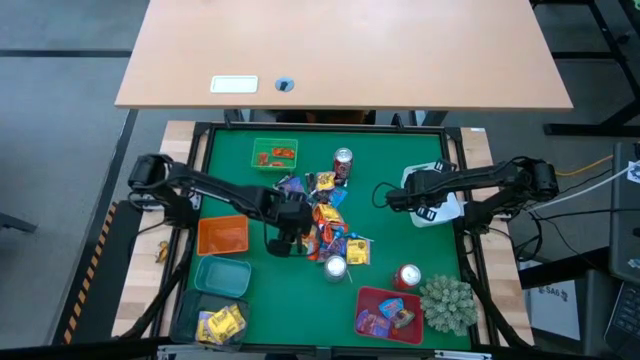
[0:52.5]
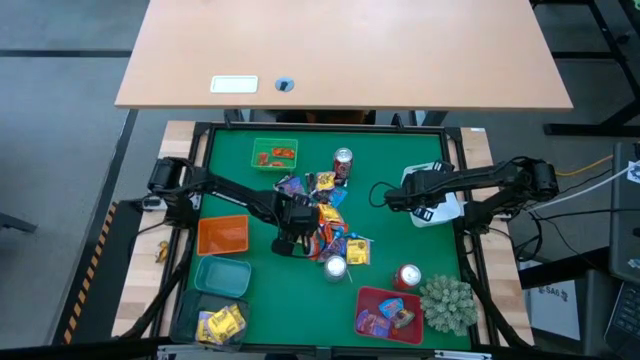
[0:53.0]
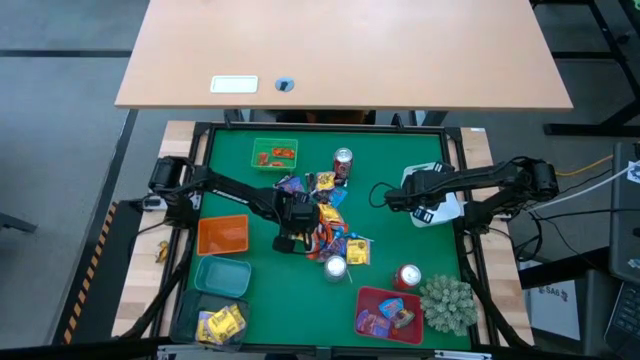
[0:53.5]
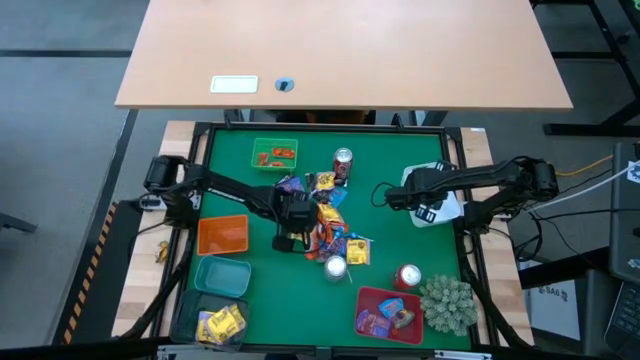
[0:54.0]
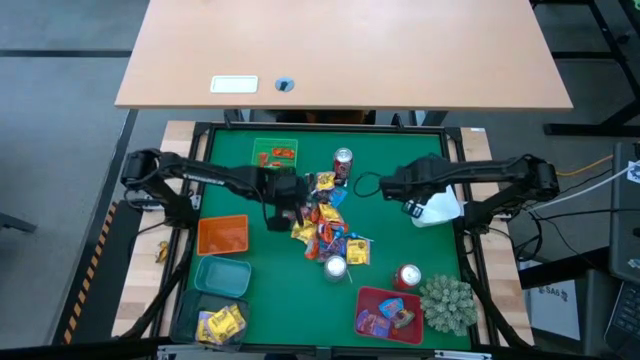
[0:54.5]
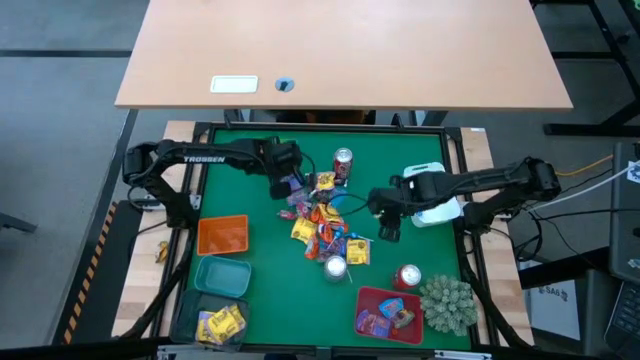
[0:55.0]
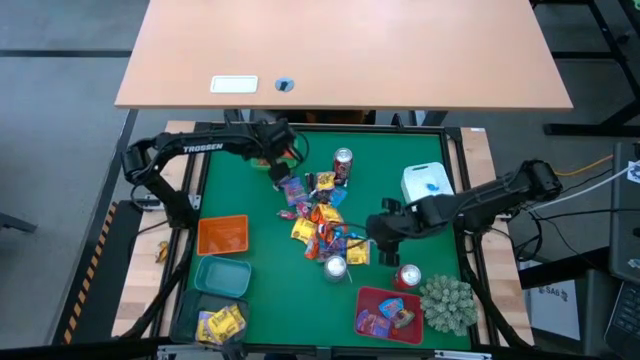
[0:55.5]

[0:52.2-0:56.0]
Task: Sort candy
Put the orange chocolate into the green bin

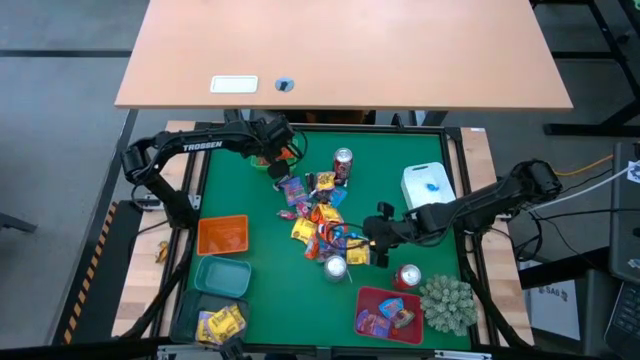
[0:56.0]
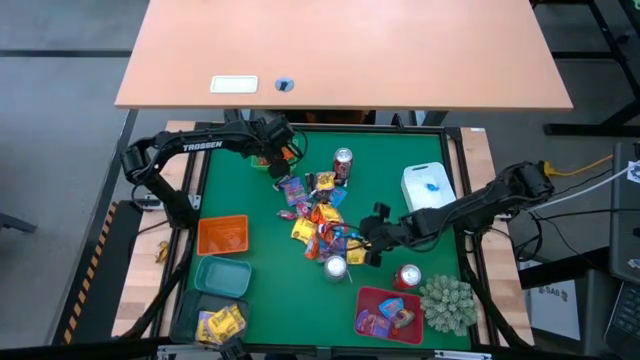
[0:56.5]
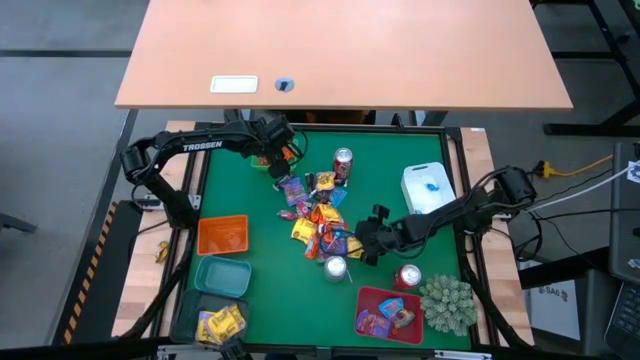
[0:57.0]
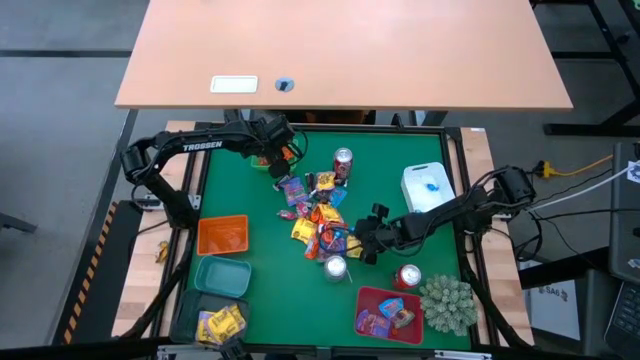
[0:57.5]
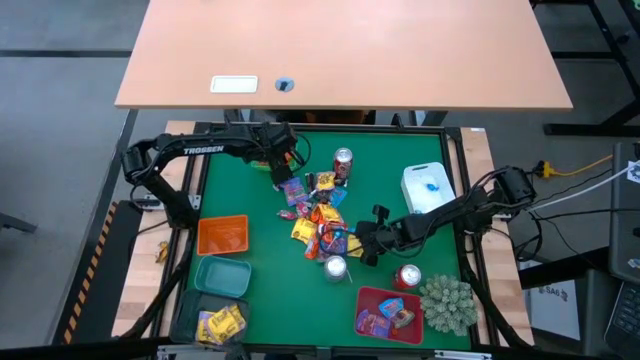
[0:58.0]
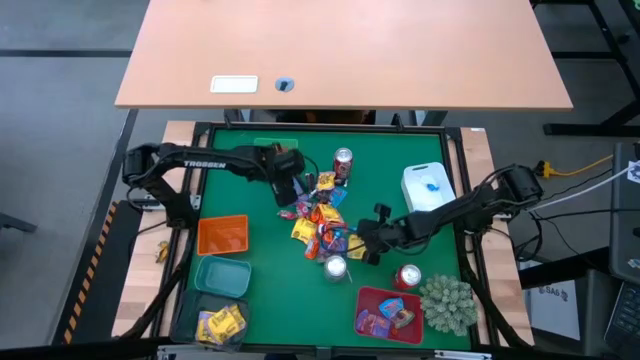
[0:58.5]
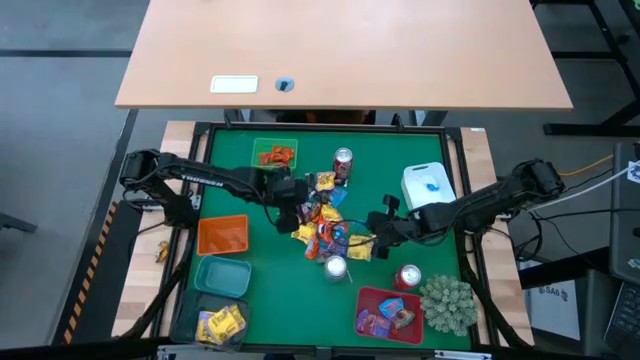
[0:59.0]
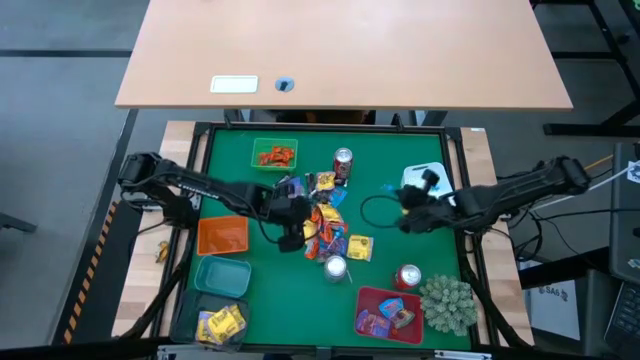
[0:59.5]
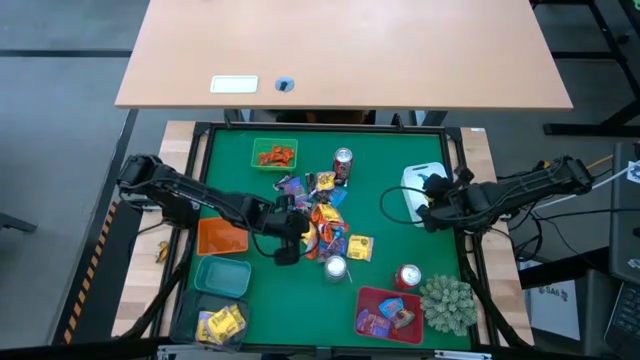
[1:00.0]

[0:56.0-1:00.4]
Put the blue lollipop candy into the white bin

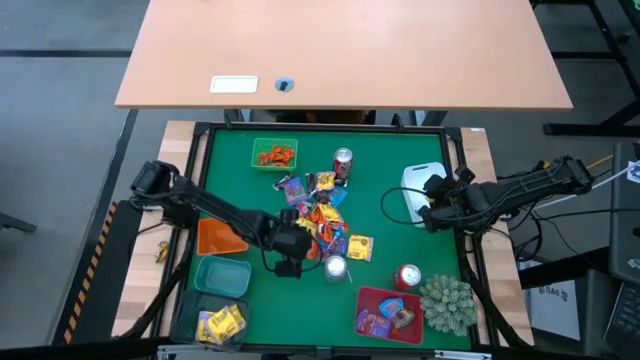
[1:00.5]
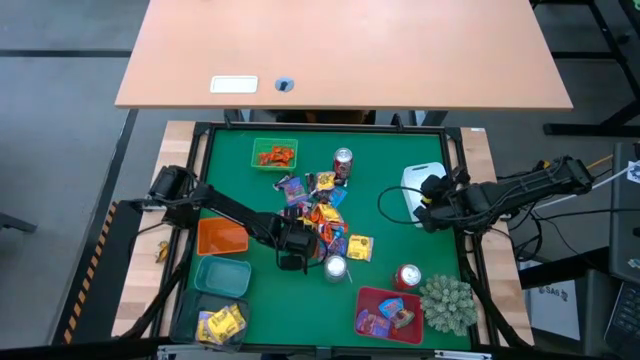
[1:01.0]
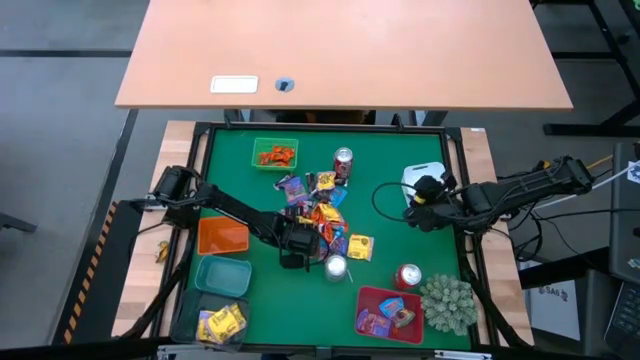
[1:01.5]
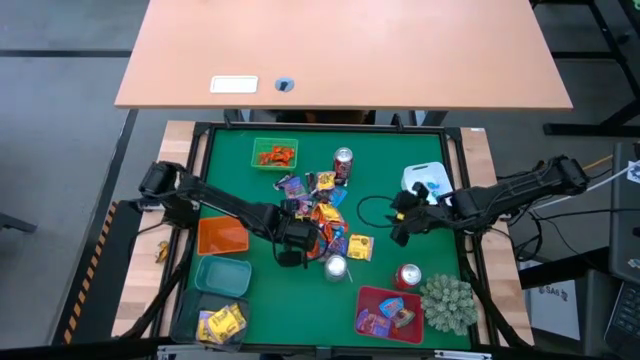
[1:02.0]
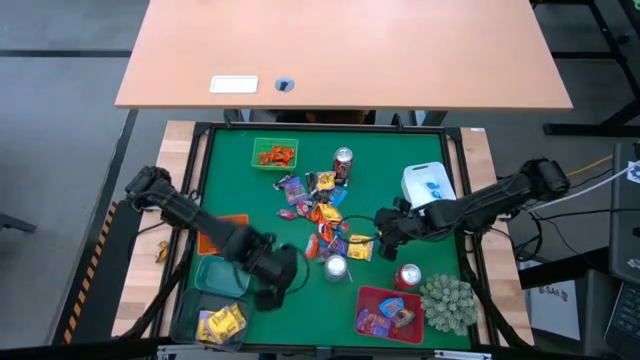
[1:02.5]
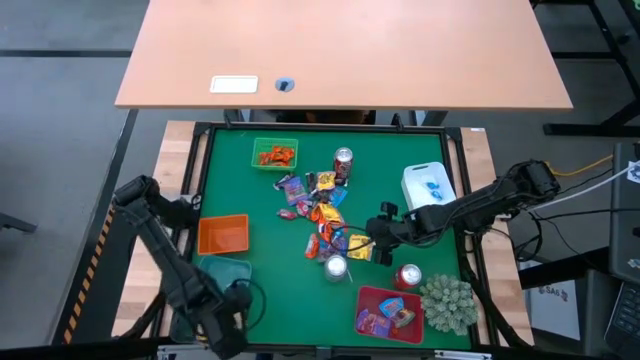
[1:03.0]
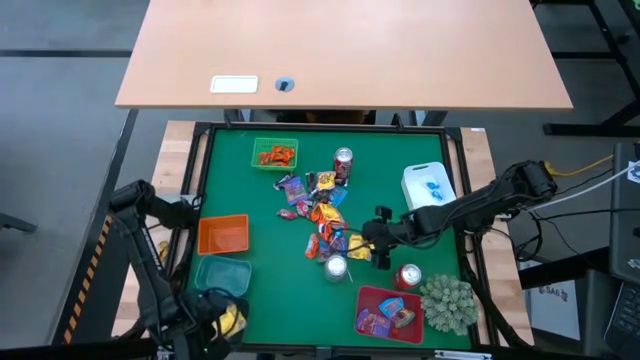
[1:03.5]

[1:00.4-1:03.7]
Put the yellow candy into the black bin

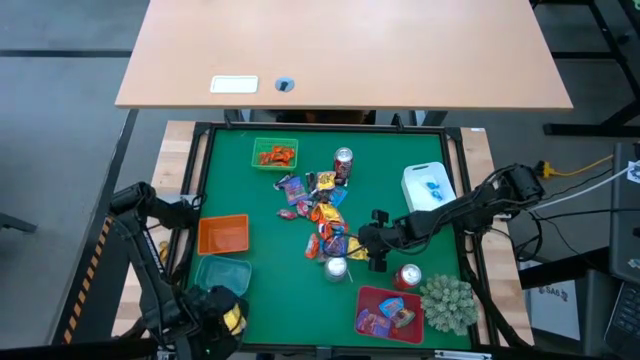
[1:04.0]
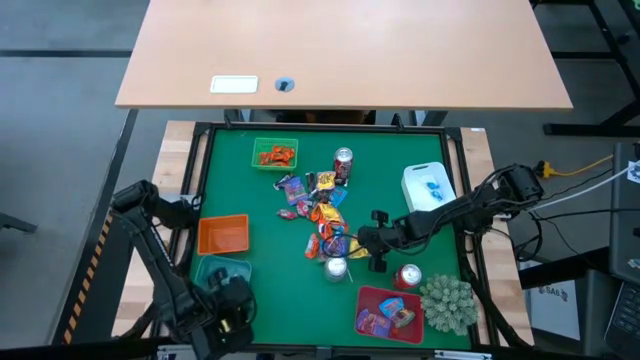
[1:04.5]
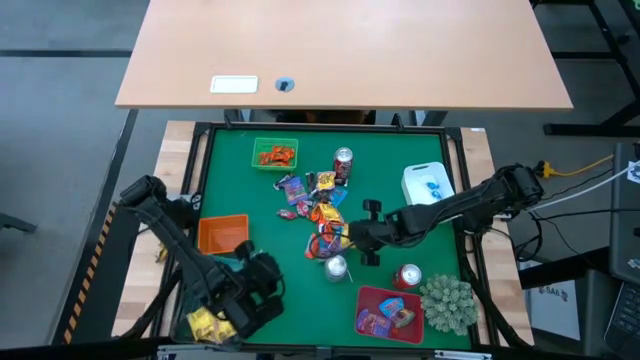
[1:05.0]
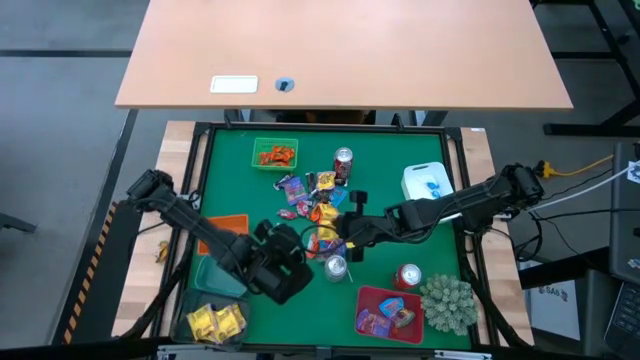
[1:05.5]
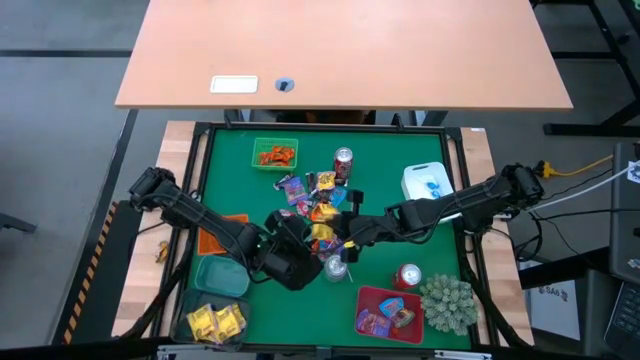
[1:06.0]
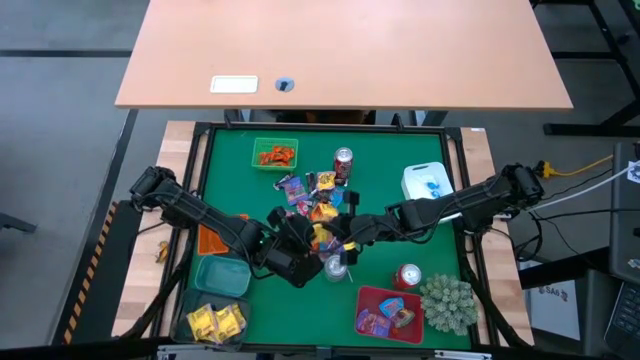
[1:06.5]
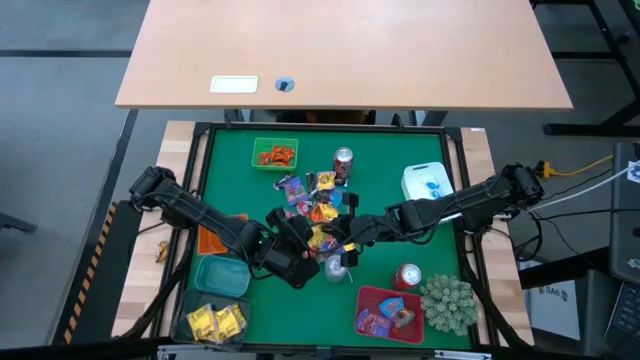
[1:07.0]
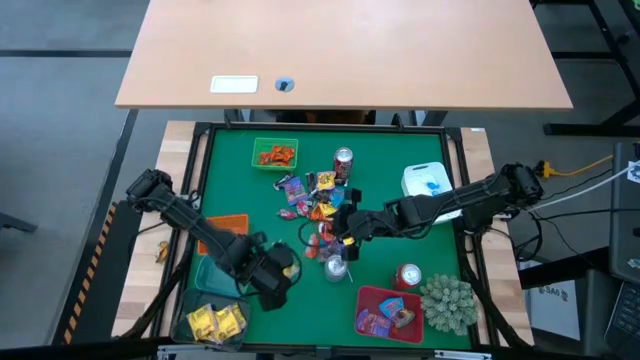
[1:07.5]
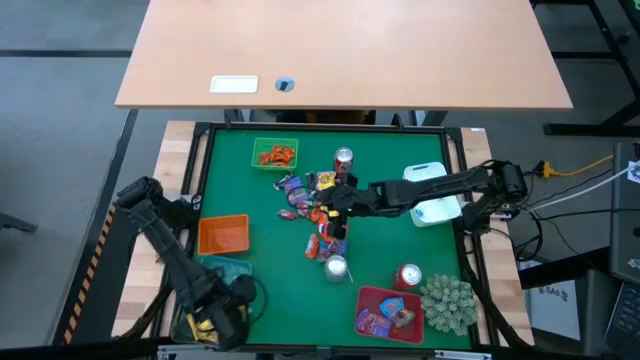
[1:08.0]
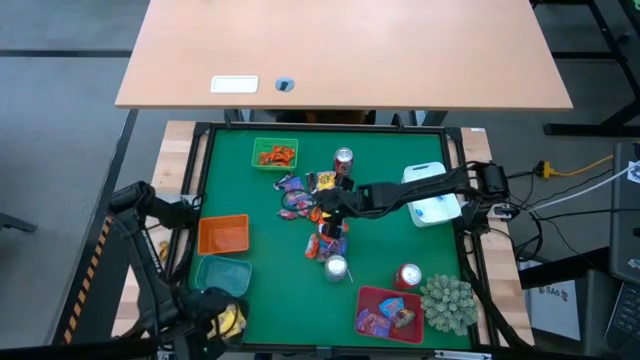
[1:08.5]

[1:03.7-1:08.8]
Put the yellow candy into the black bin

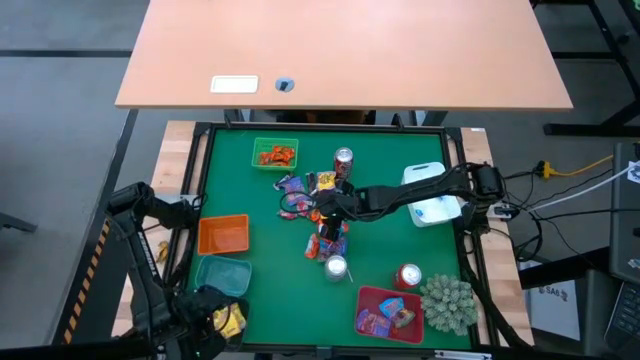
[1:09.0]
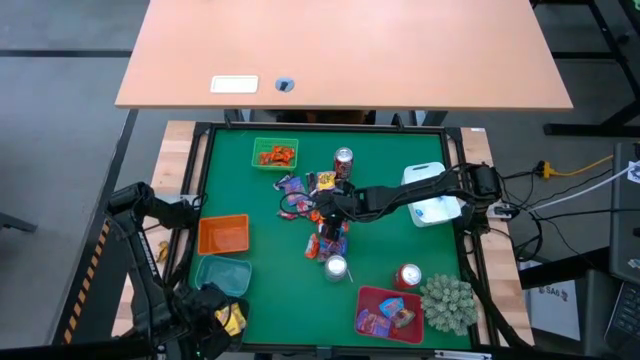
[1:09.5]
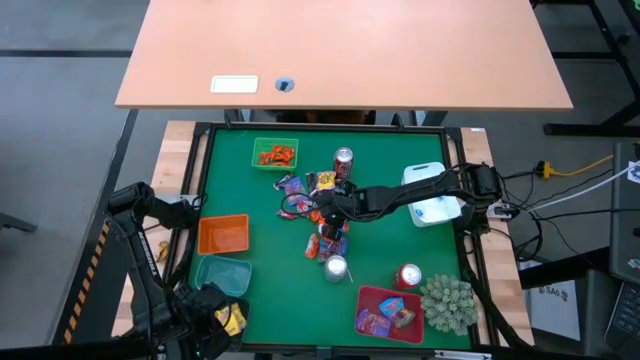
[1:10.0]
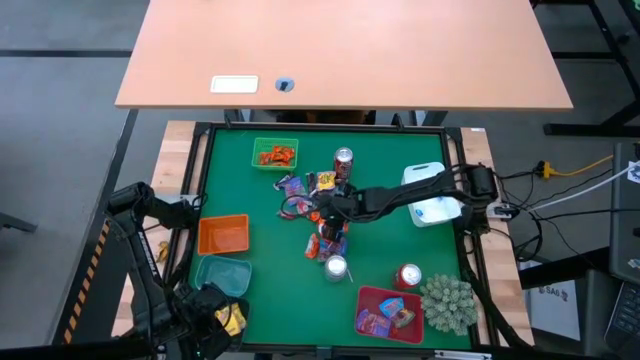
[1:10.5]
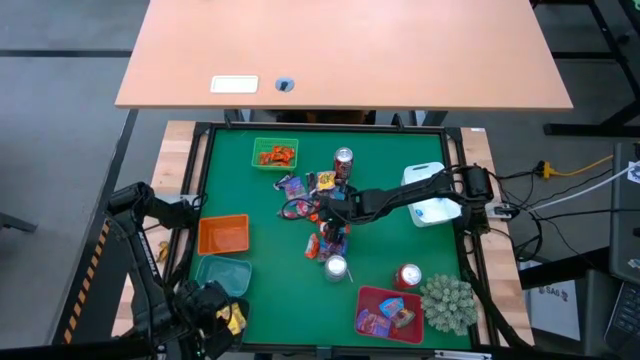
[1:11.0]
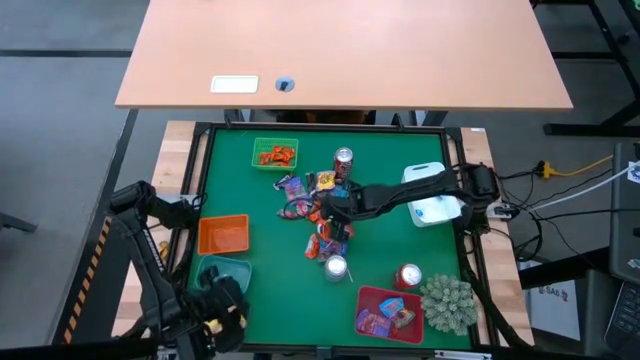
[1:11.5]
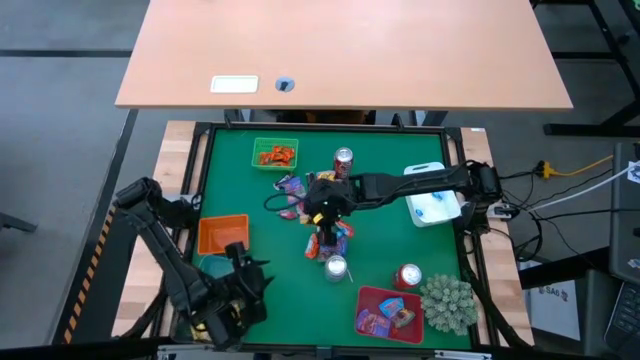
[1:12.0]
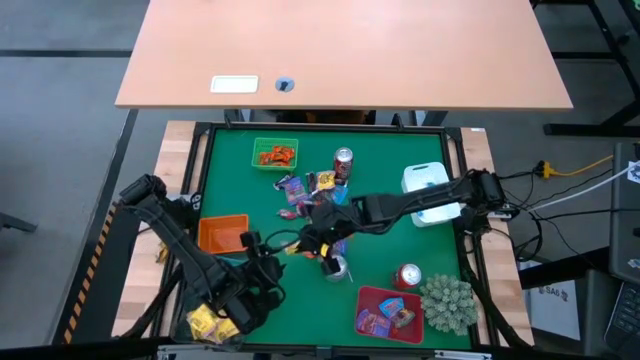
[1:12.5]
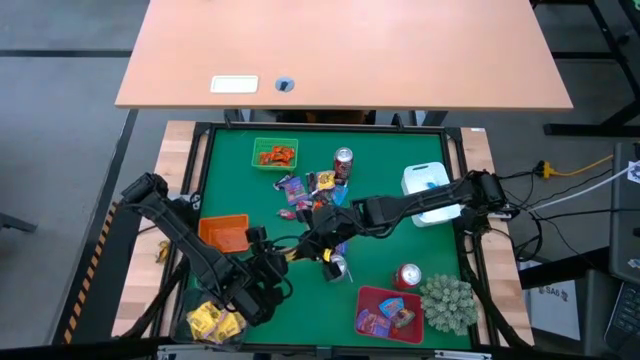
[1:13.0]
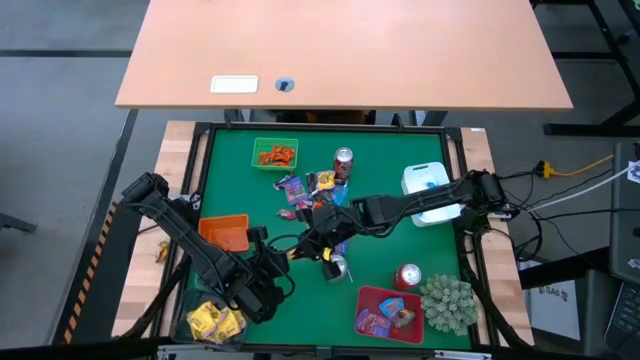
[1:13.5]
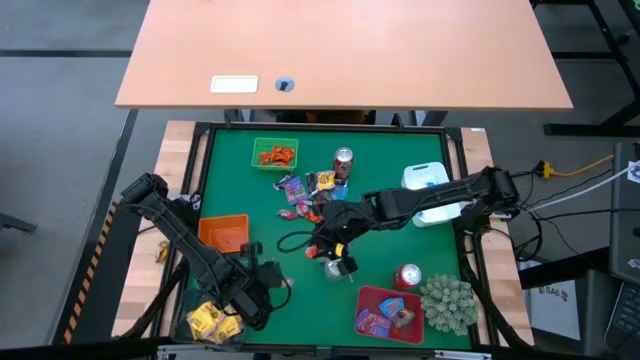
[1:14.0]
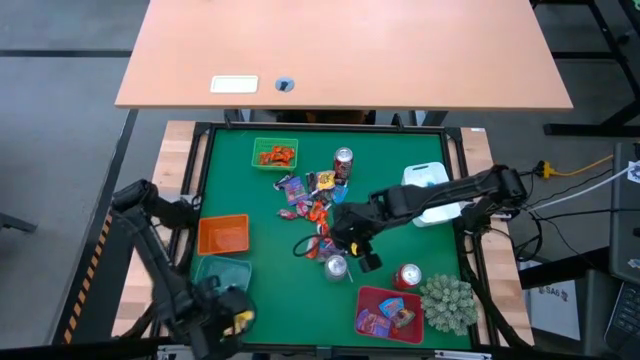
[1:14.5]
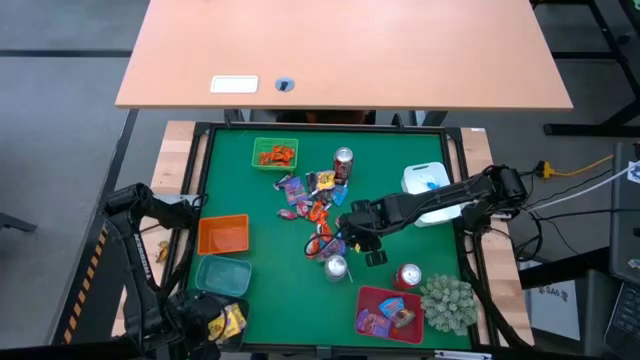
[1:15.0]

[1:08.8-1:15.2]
Put the yellow candy into the black bin
